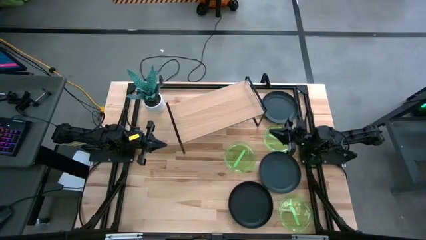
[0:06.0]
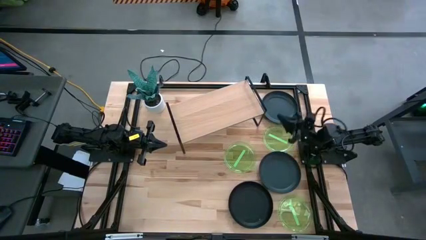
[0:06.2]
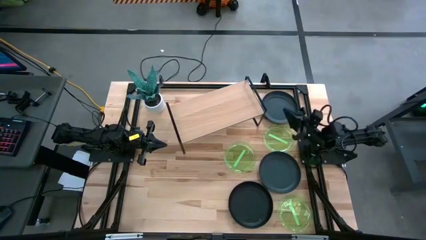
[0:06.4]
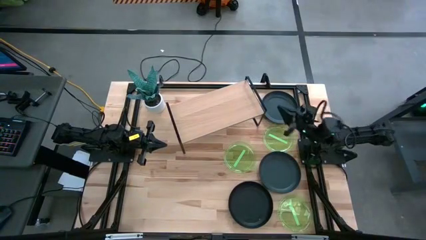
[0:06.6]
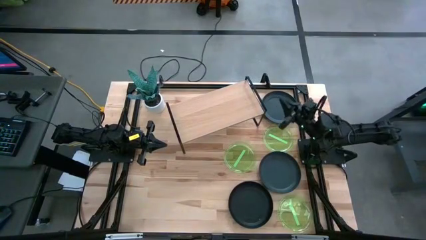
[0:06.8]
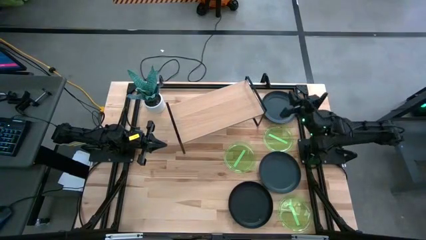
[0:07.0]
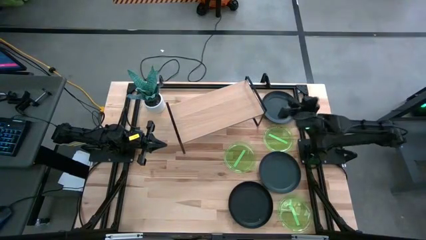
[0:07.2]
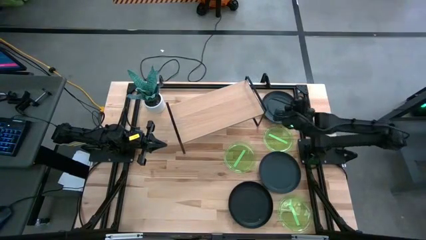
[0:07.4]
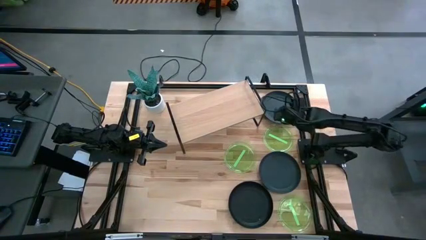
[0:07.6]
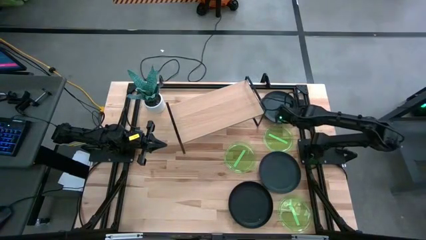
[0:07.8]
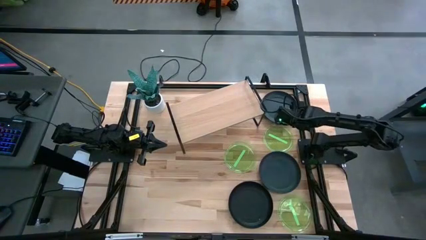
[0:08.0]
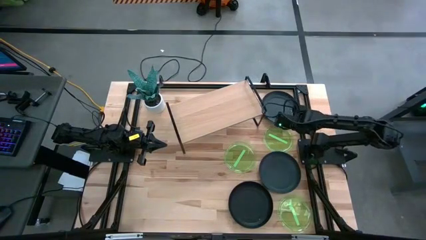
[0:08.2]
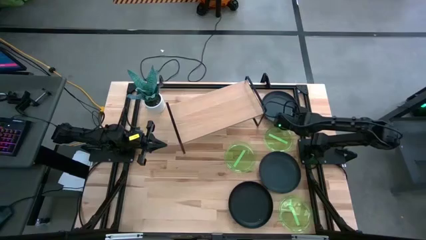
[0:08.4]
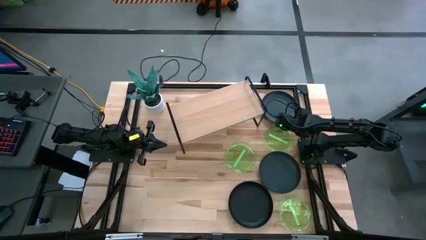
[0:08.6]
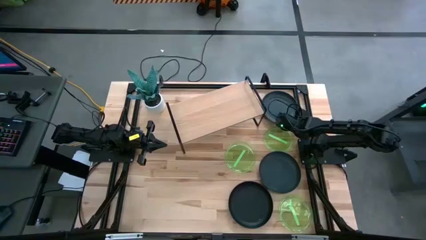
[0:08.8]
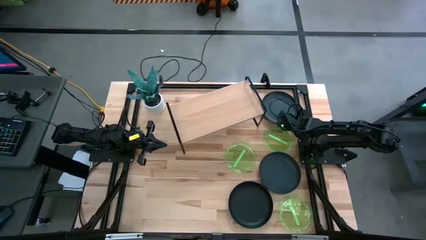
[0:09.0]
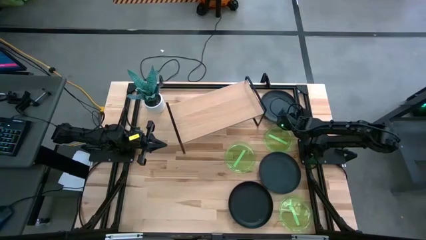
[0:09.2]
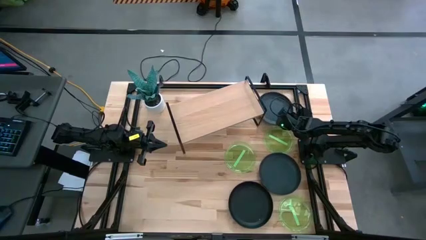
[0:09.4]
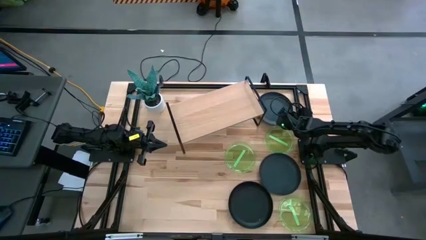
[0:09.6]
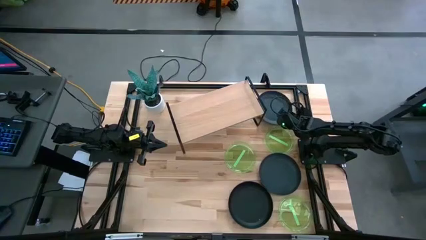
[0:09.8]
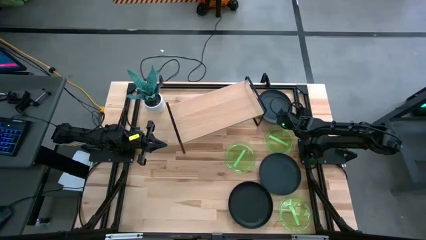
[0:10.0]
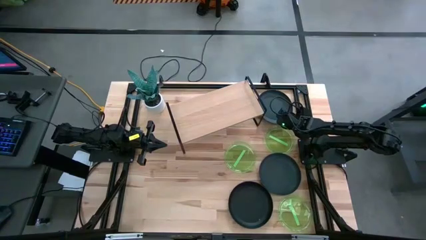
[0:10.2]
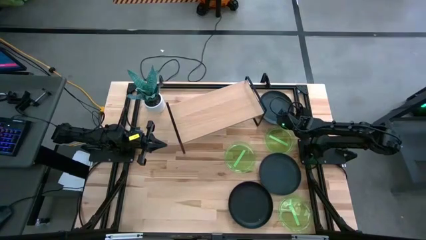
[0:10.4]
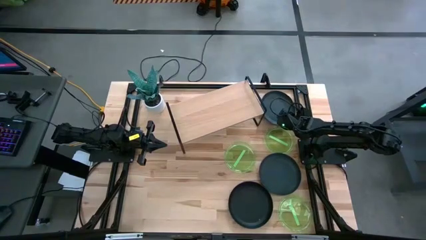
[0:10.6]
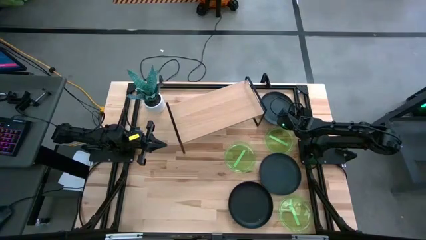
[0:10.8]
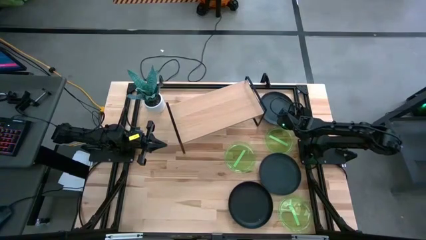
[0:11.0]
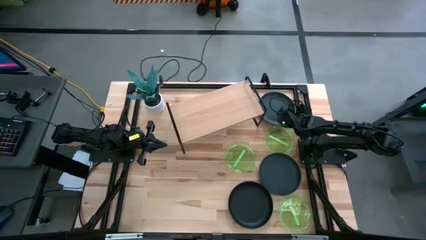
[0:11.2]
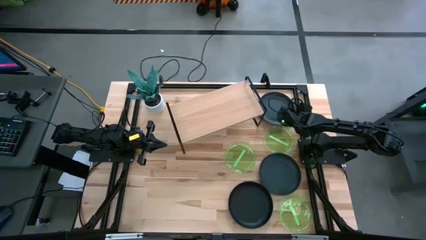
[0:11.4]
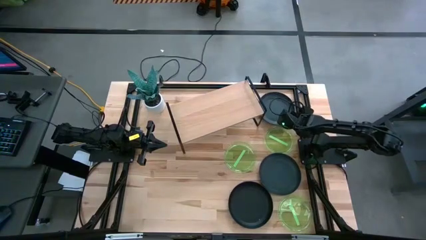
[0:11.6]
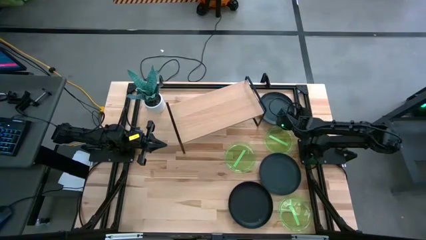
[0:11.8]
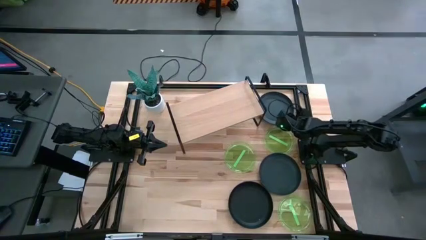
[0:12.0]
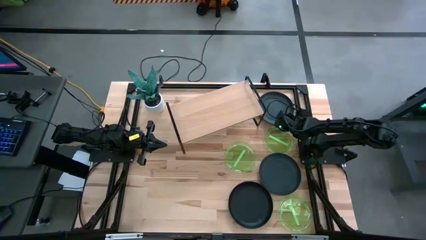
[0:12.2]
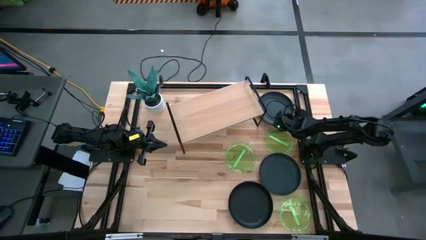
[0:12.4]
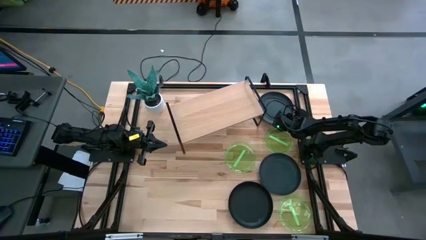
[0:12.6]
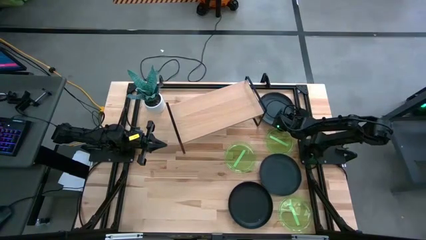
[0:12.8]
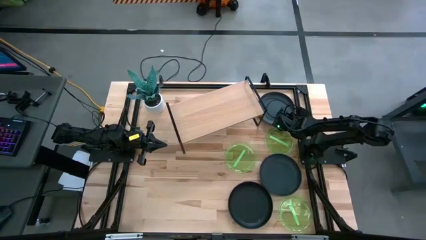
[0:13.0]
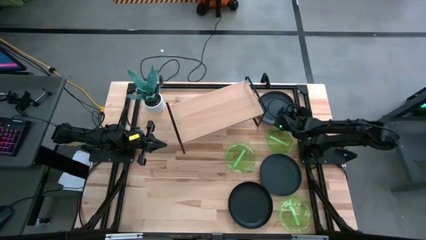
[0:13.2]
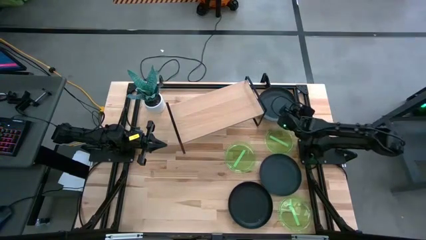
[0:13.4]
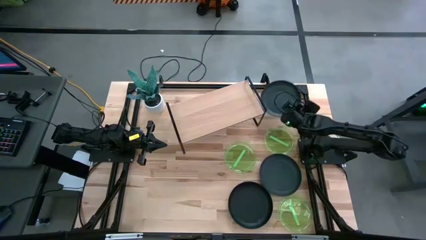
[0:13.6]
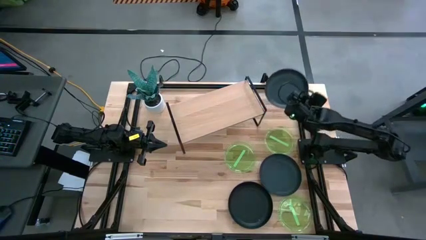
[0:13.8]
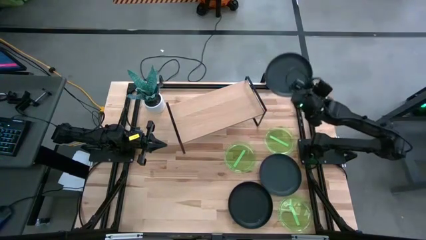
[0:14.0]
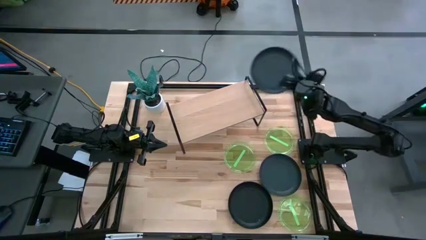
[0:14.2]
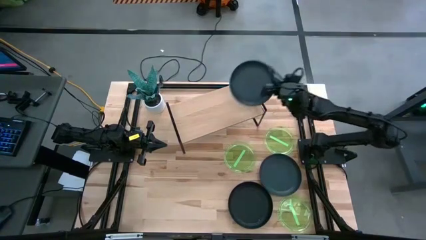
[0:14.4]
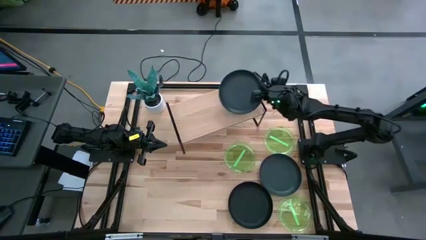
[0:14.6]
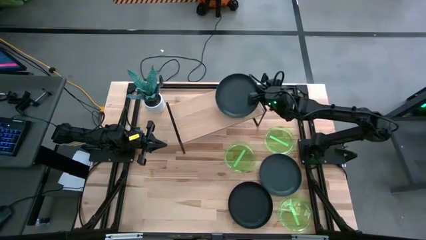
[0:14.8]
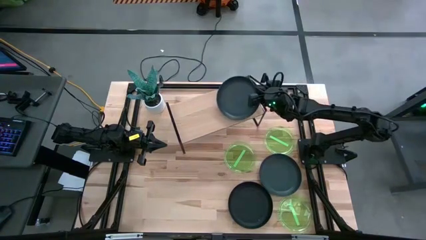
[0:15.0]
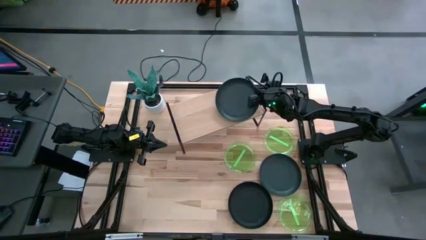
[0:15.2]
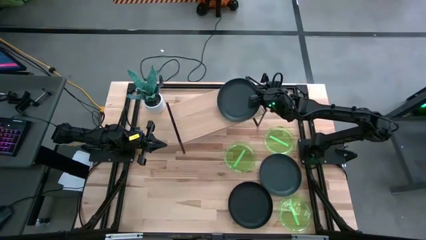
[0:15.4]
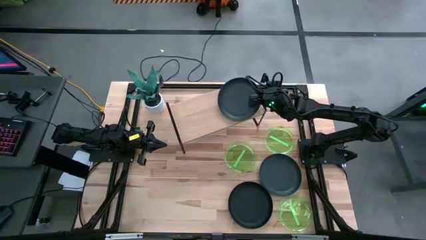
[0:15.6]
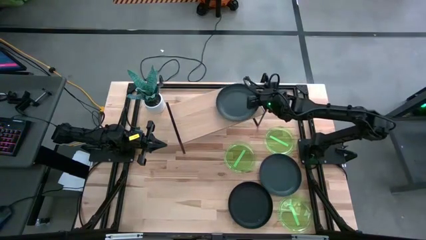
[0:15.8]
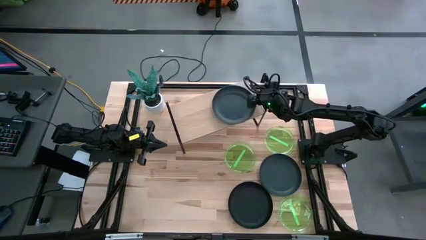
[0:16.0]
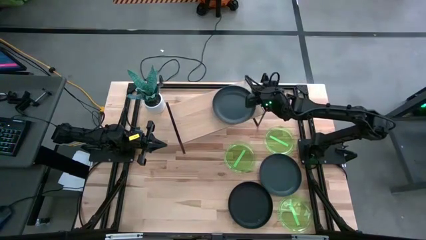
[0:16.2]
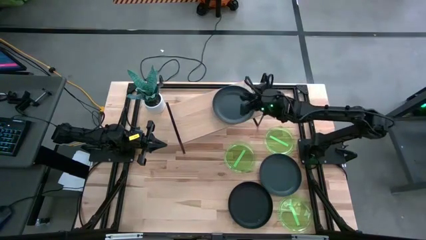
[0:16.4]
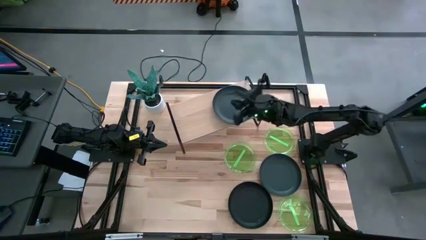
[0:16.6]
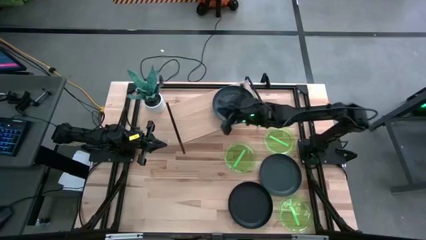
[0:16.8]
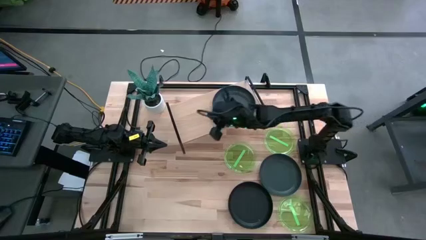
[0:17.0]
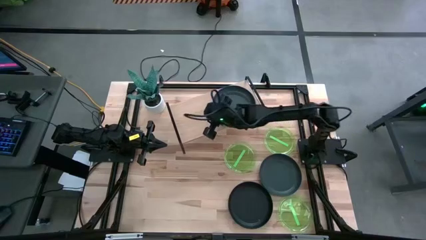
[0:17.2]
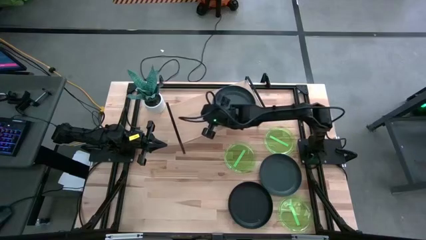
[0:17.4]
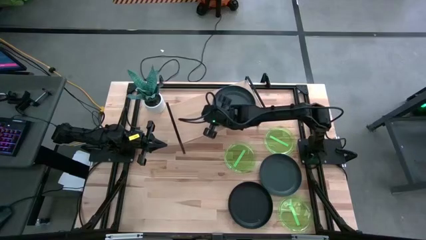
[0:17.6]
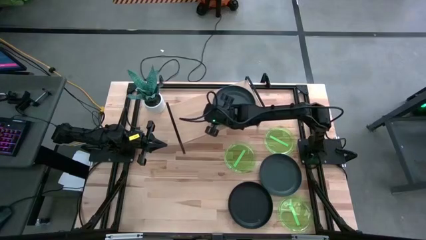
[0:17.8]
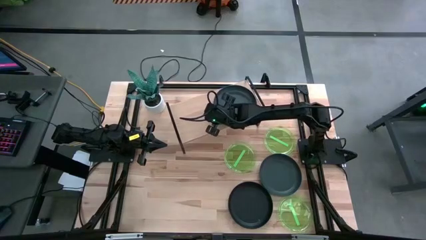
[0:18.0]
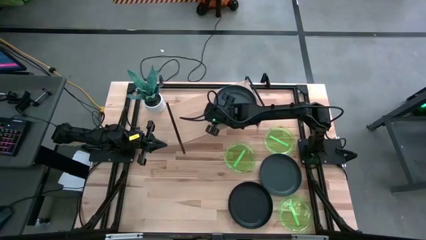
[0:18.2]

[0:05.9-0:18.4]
Task: Place and stack plates onto a shelf
Put the top black plate on the shelf
